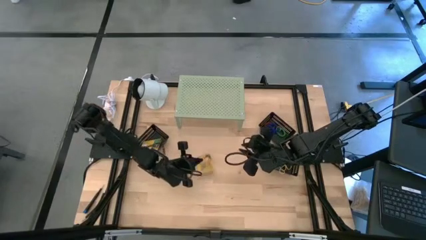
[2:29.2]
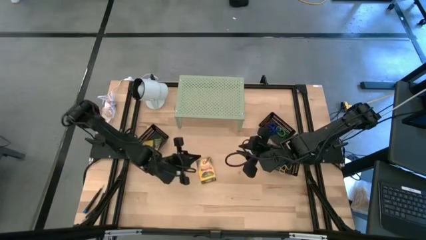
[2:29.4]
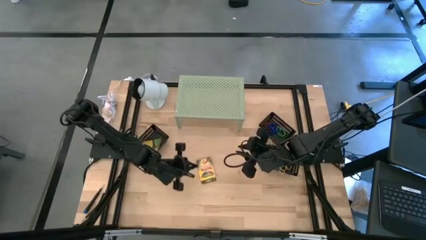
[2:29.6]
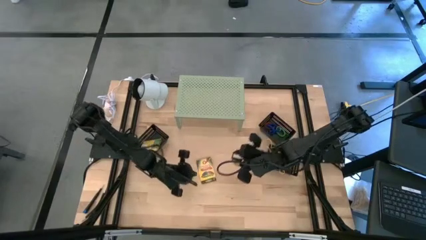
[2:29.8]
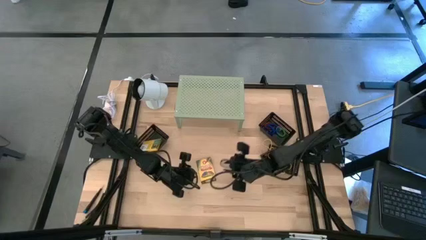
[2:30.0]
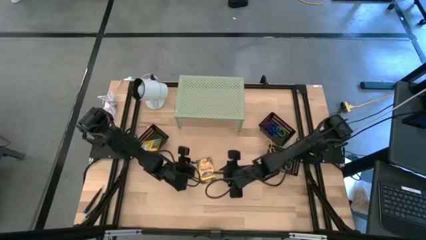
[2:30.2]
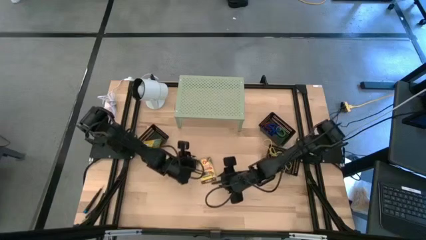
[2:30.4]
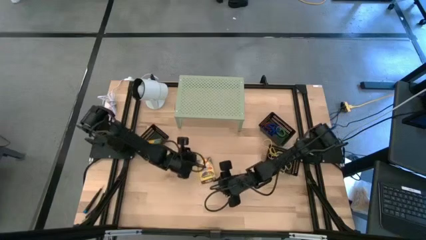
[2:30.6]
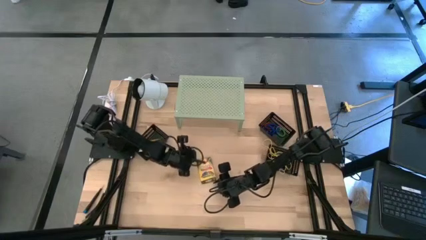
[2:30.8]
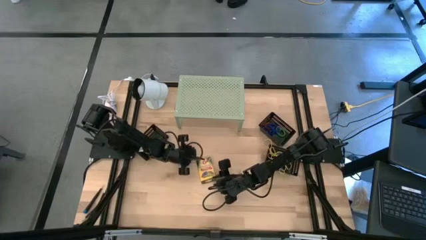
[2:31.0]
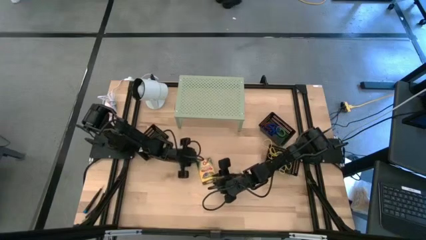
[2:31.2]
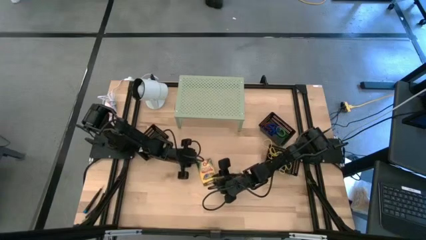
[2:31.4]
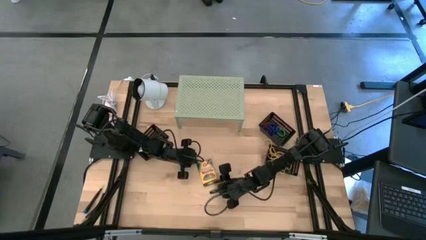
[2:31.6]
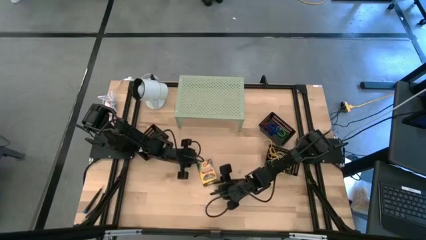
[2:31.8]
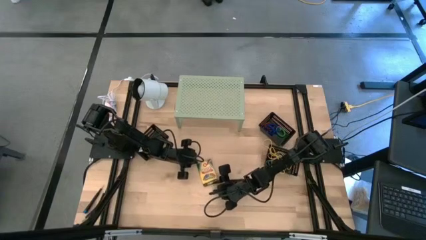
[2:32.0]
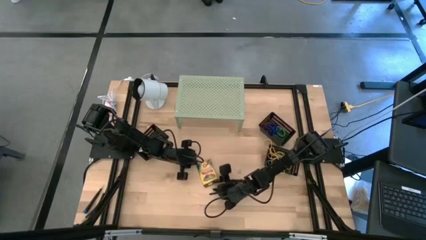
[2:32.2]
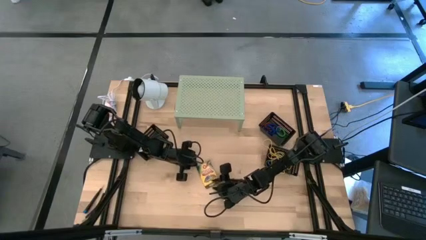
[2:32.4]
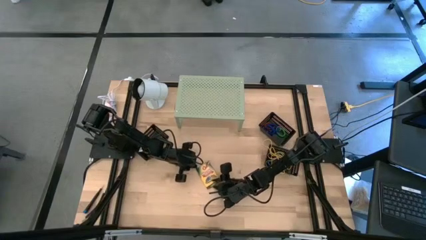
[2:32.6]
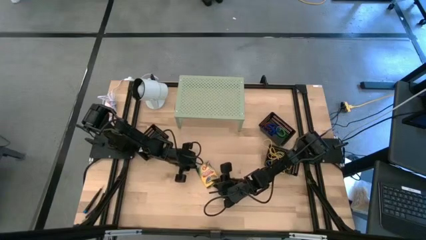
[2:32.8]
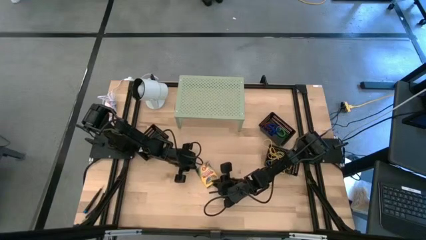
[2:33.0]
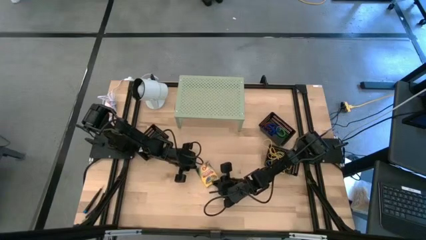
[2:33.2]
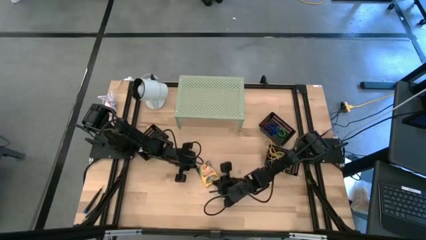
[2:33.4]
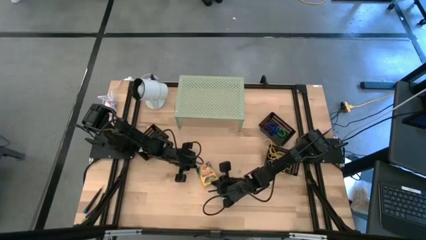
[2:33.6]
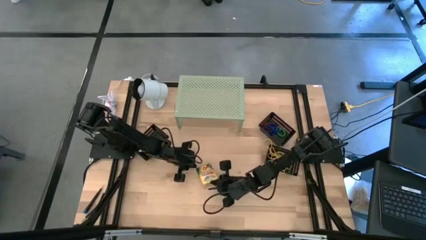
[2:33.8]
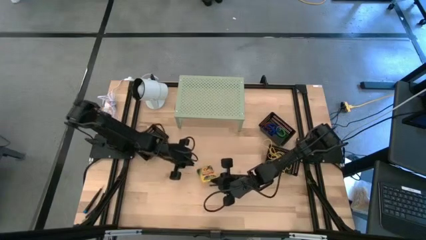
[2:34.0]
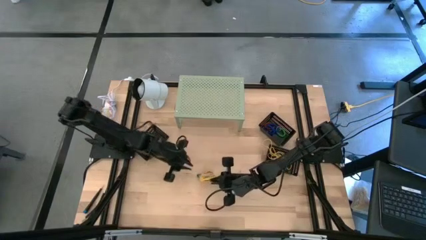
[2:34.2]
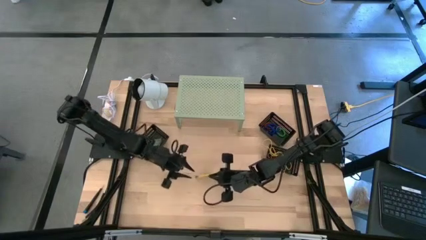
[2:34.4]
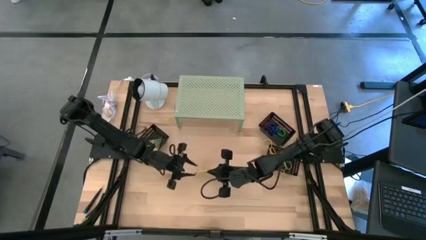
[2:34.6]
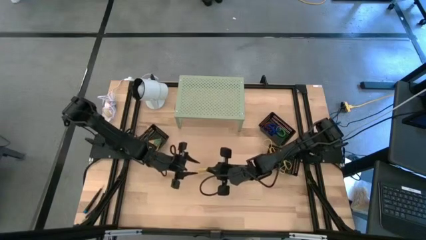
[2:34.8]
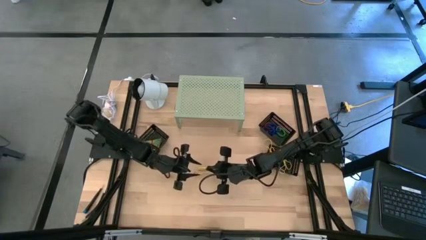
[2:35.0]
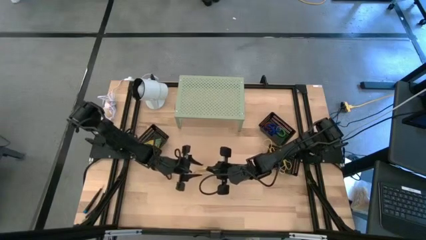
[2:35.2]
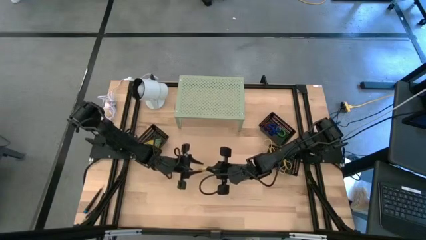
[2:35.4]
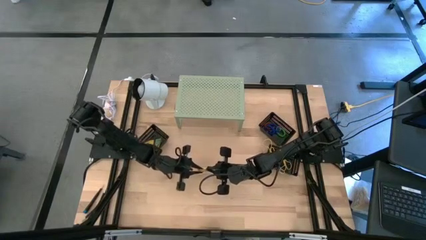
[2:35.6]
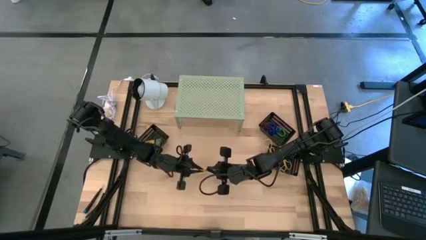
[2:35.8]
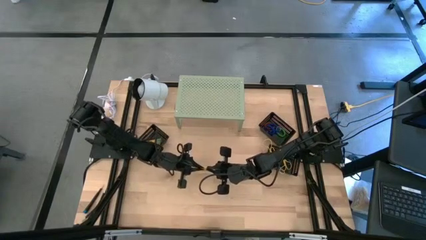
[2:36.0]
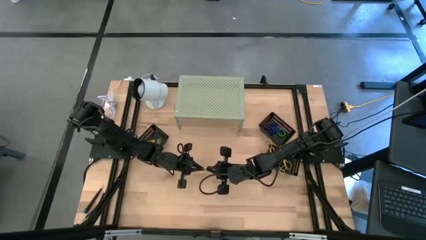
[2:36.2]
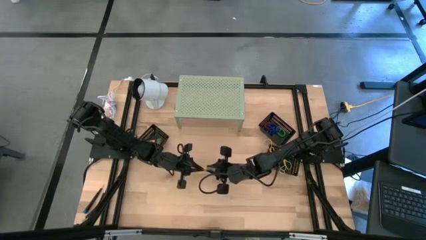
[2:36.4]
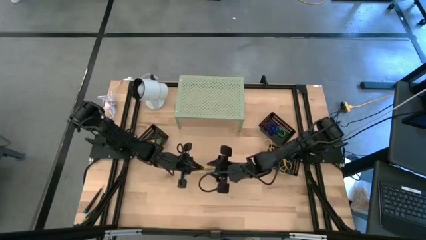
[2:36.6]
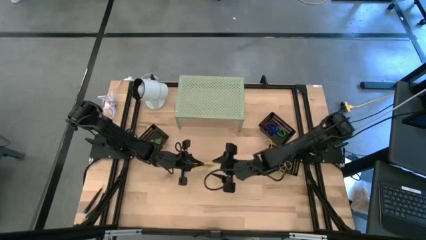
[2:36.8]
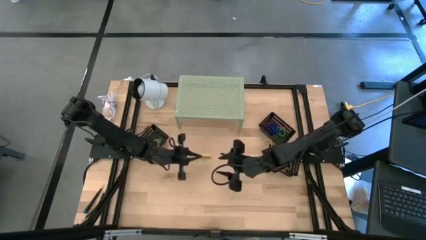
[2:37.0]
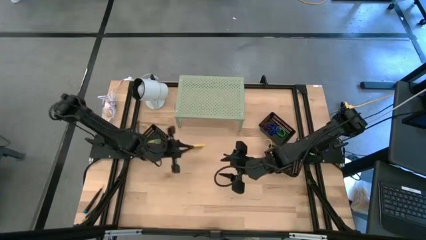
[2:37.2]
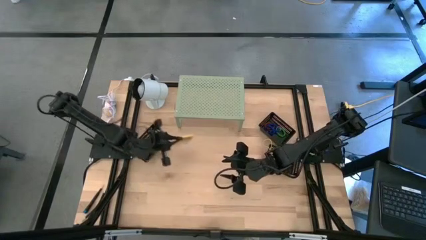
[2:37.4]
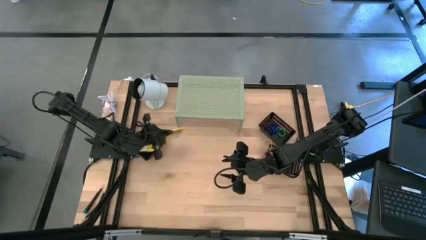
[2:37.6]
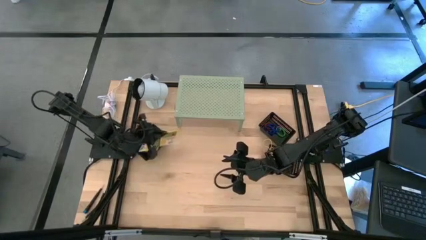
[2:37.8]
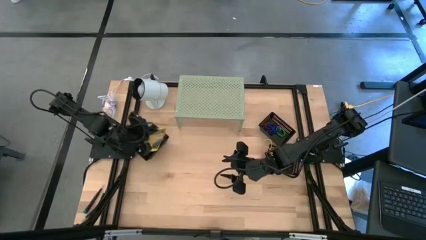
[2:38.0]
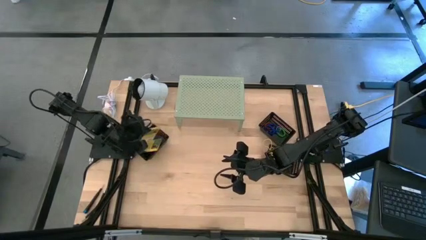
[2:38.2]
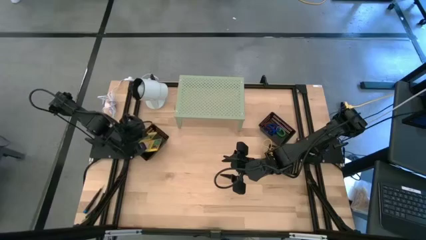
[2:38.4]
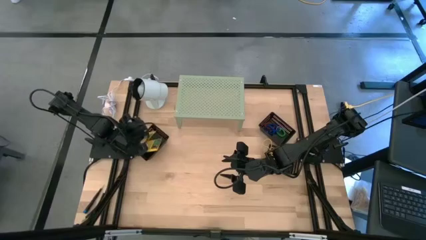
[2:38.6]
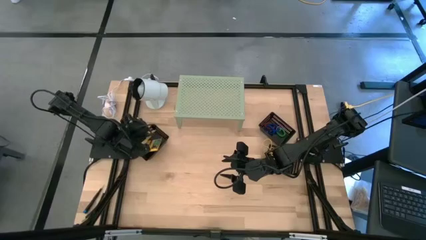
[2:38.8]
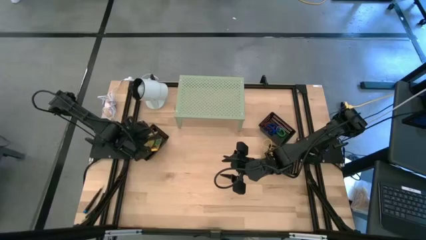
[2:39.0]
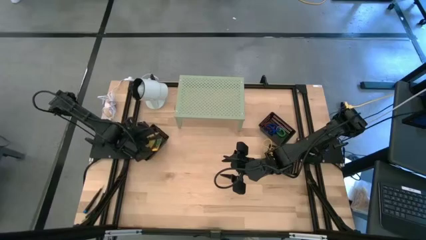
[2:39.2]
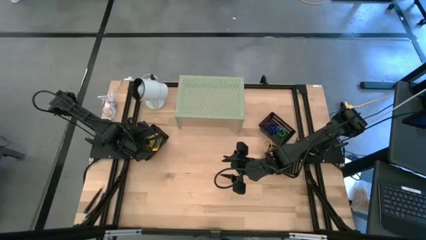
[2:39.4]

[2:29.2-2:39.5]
Task: Pick & Place Office Desk Supplies
Put the yellow crayon box into the bottom left black bin

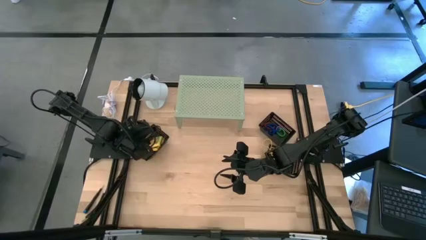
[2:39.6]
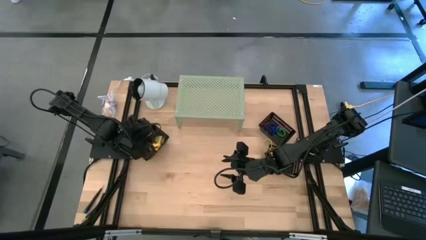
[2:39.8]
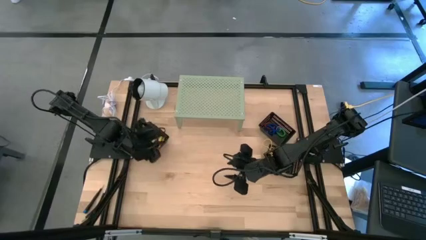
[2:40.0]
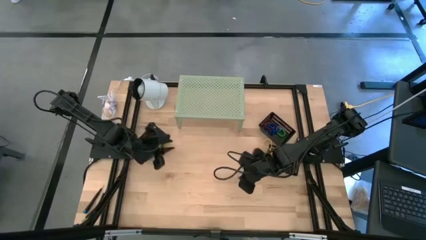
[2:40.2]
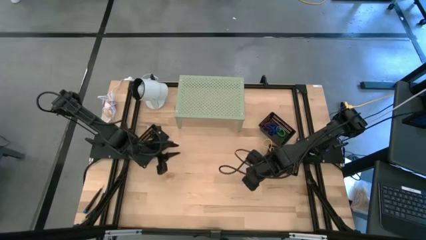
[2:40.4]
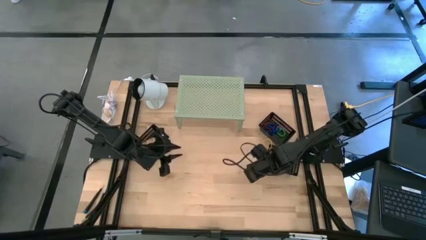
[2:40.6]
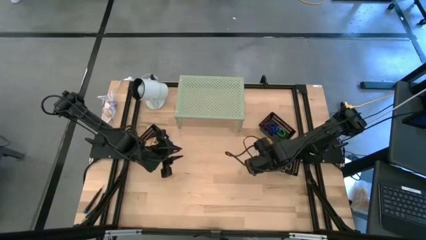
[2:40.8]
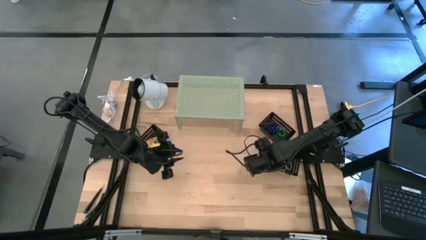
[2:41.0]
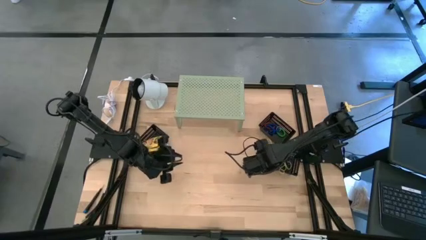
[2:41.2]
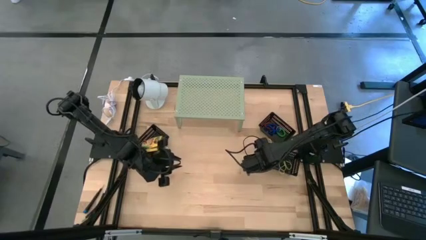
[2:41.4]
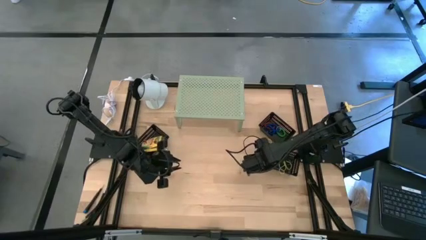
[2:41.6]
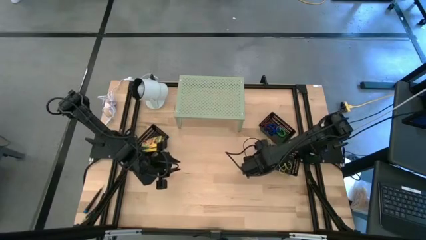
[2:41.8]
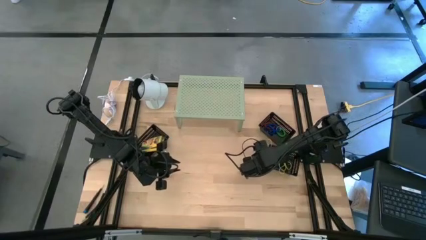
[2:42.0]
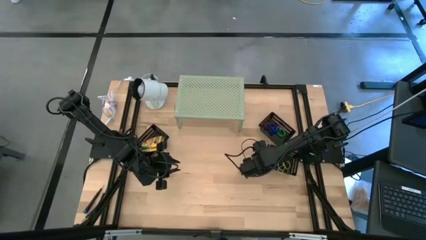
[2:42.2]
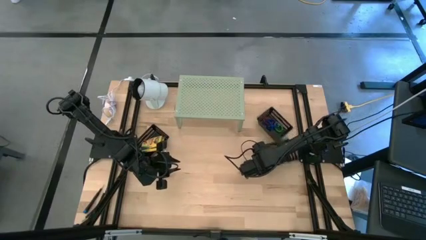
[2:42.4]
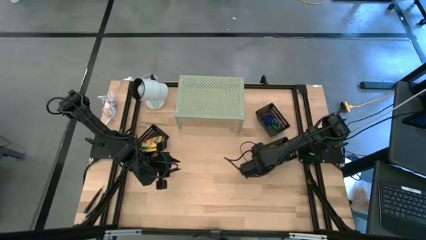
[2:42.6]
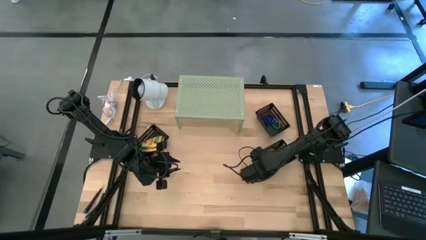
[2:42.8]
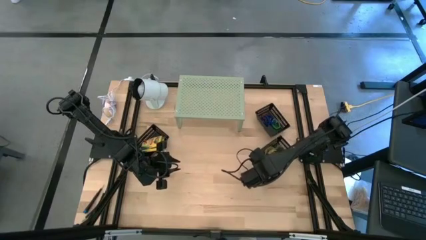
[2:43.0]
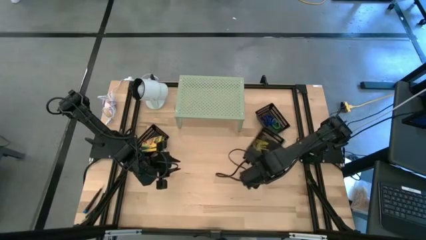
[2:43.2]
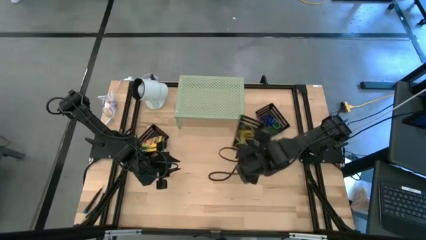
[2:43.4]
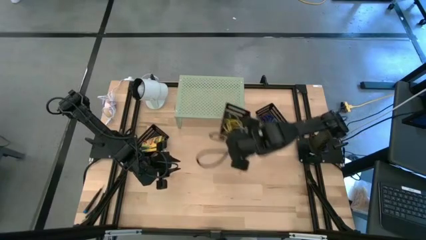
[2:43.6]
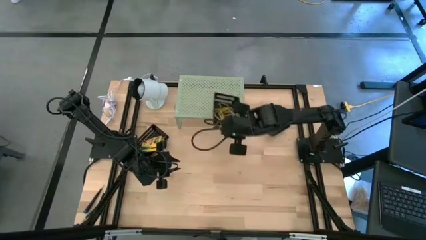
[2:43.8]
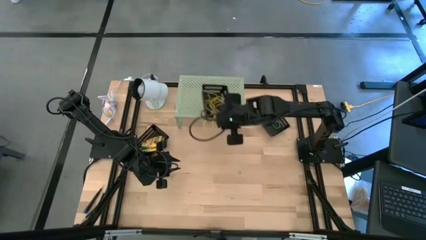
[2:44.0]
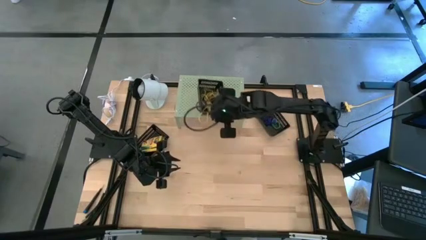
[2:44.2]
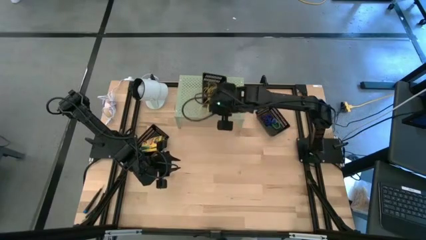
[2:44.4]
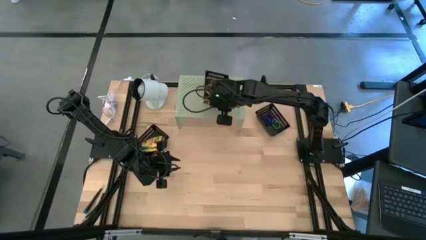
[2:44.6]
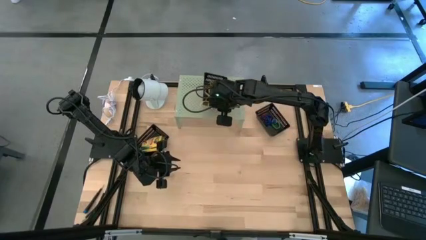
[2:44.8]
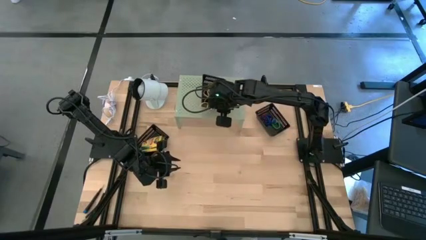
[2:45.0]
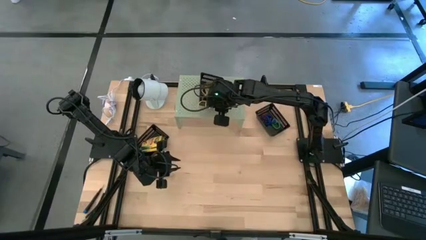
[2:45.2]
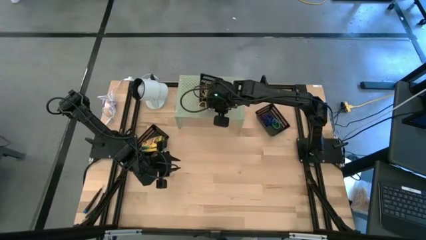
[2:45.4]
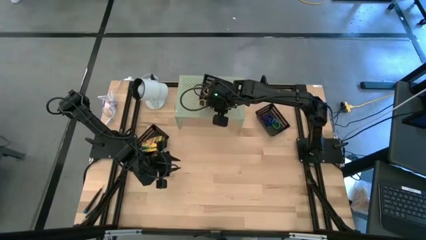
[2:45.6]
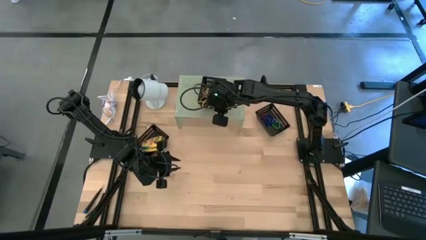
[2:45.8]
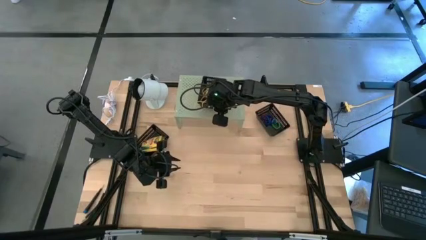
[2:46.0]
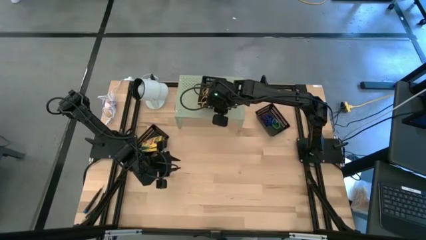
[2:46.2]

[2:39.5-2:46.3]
Put the bottom right black bin on the shelf
